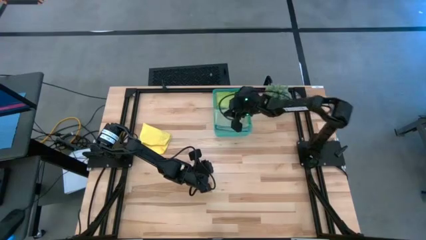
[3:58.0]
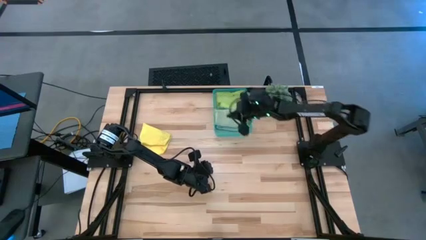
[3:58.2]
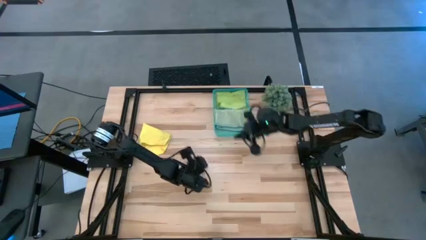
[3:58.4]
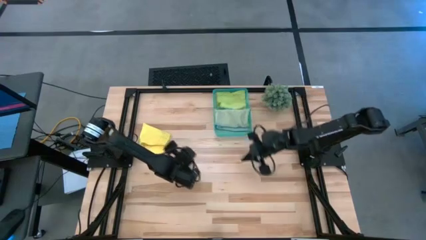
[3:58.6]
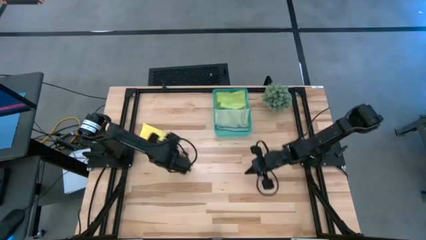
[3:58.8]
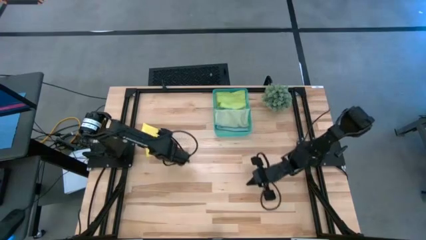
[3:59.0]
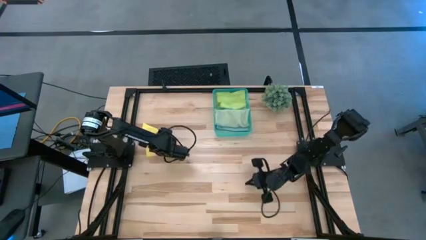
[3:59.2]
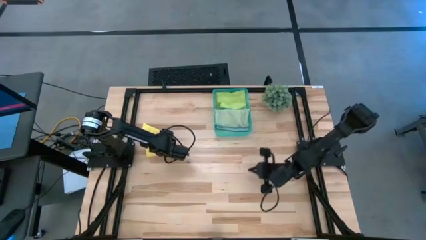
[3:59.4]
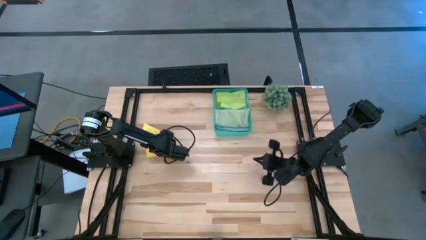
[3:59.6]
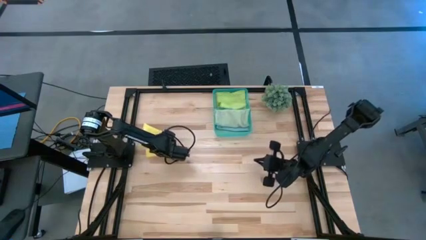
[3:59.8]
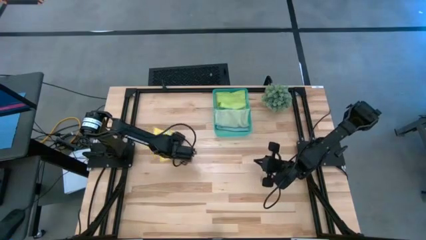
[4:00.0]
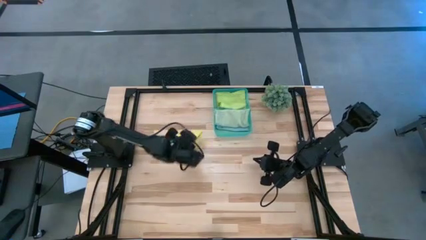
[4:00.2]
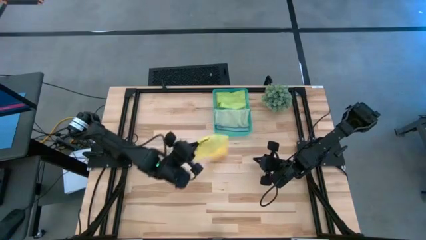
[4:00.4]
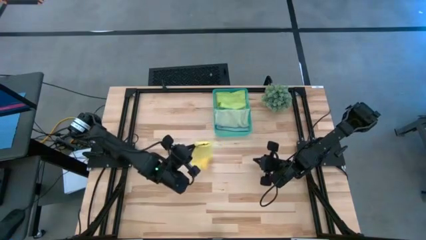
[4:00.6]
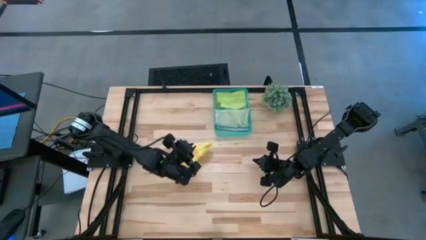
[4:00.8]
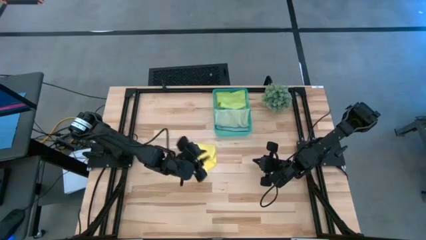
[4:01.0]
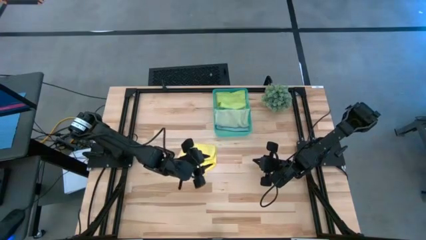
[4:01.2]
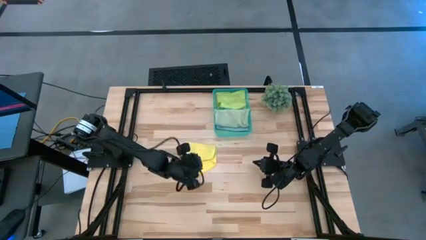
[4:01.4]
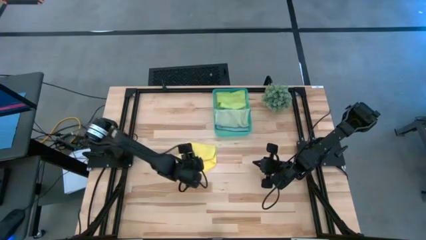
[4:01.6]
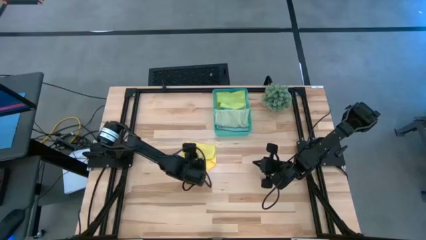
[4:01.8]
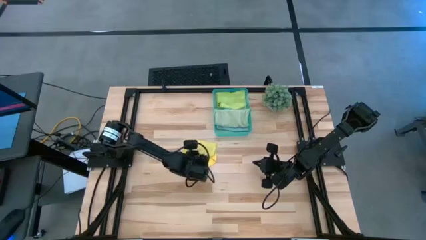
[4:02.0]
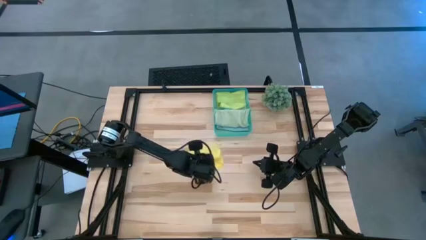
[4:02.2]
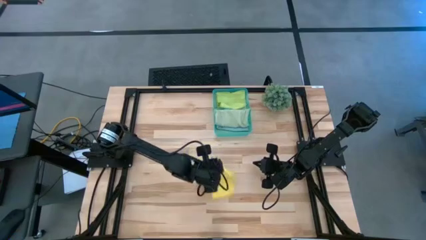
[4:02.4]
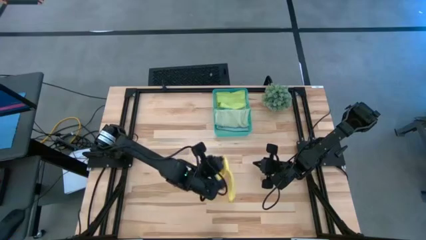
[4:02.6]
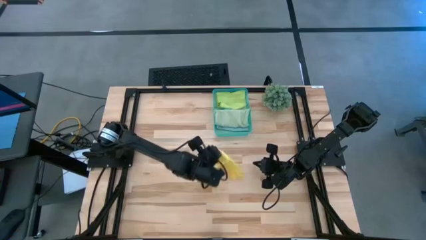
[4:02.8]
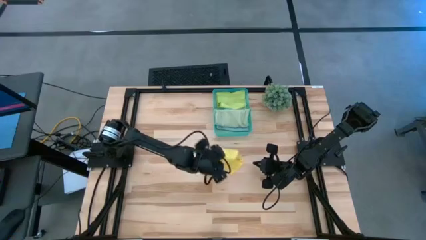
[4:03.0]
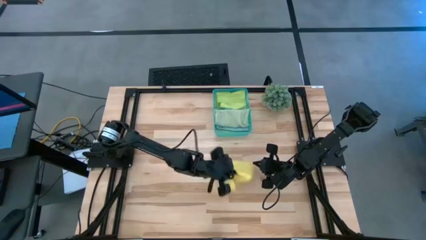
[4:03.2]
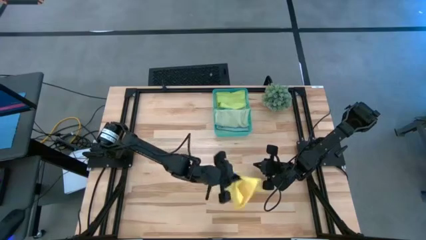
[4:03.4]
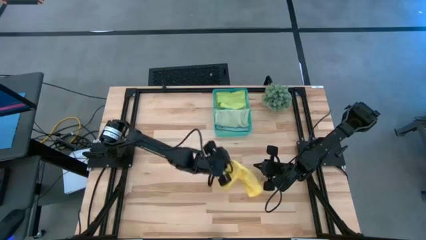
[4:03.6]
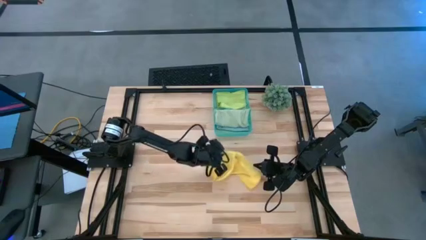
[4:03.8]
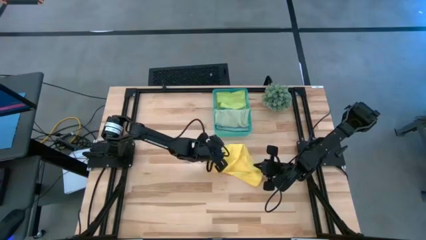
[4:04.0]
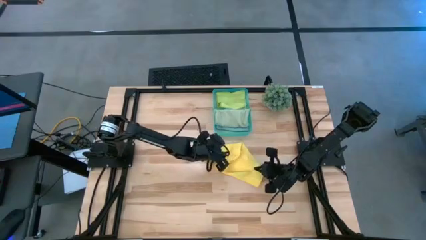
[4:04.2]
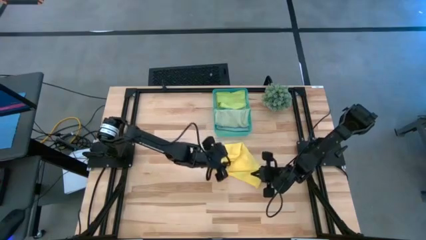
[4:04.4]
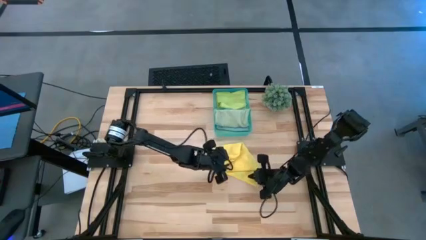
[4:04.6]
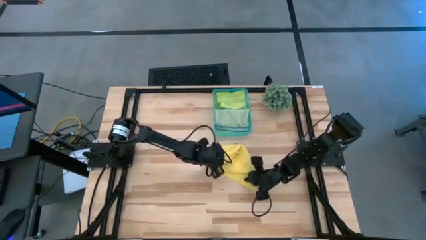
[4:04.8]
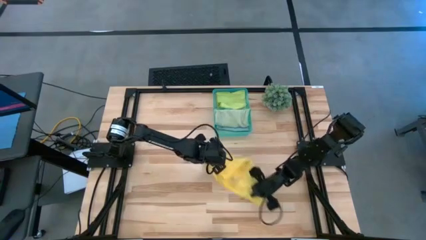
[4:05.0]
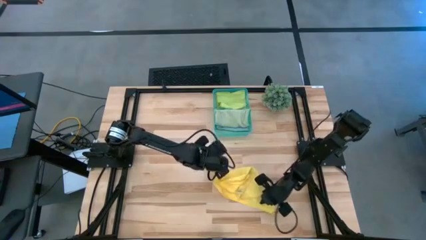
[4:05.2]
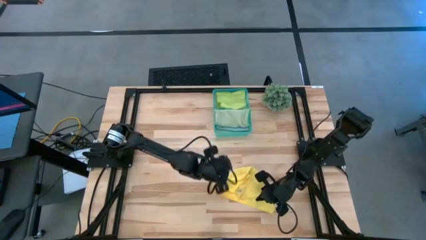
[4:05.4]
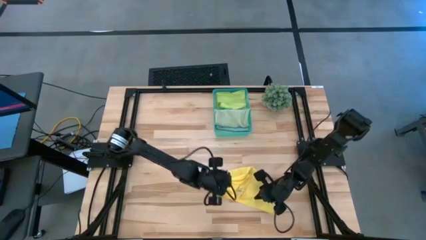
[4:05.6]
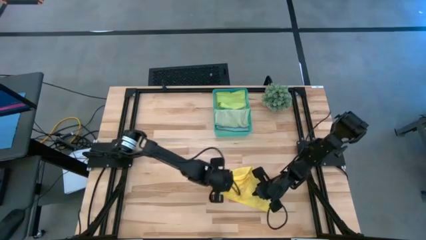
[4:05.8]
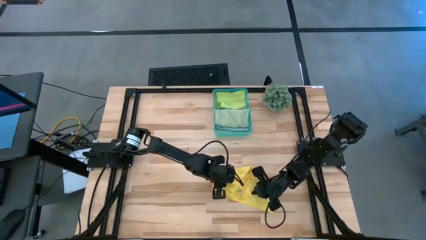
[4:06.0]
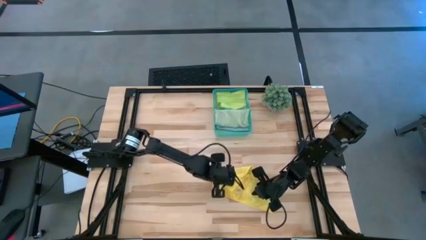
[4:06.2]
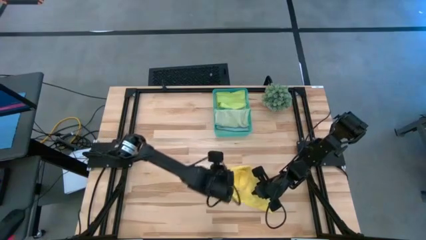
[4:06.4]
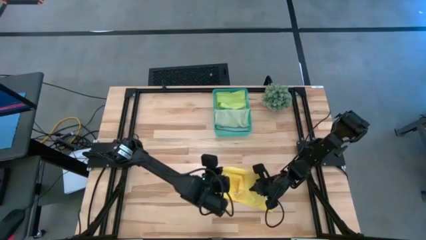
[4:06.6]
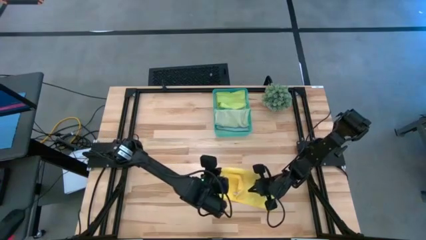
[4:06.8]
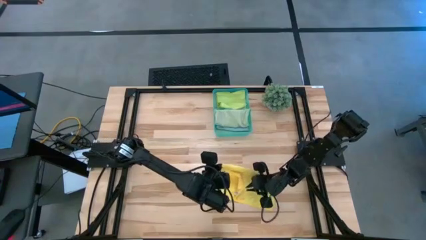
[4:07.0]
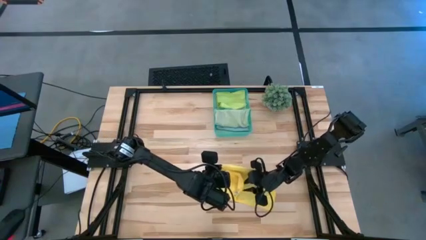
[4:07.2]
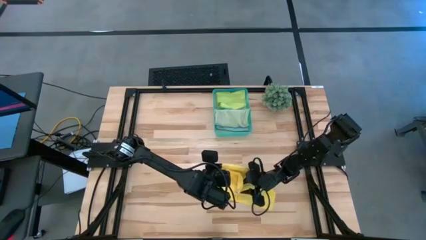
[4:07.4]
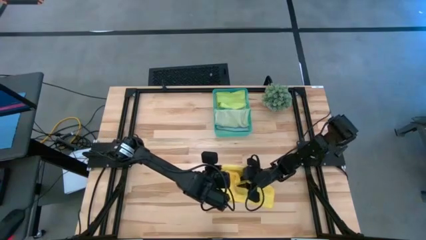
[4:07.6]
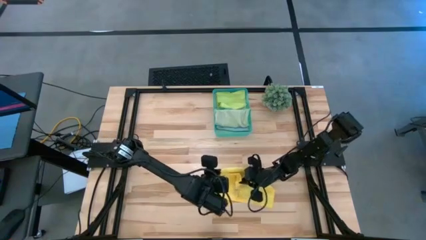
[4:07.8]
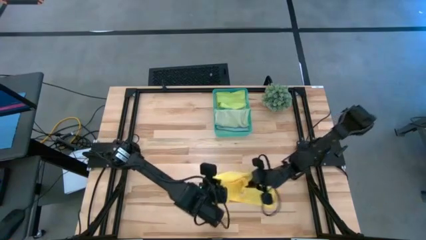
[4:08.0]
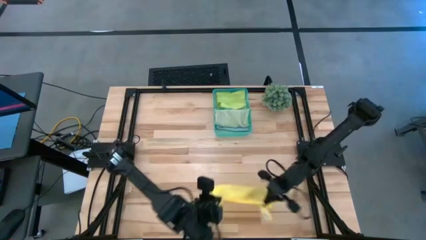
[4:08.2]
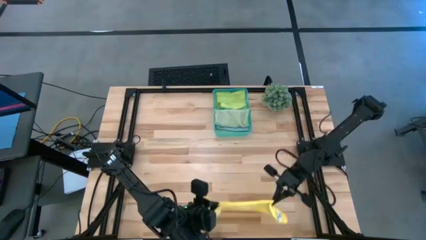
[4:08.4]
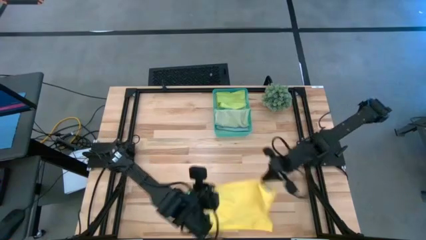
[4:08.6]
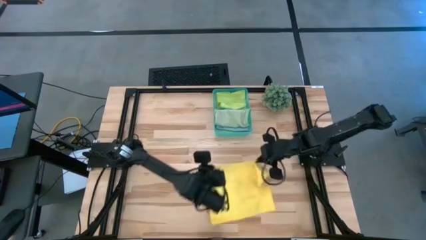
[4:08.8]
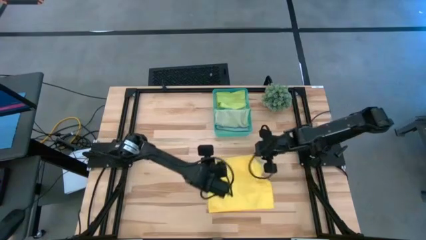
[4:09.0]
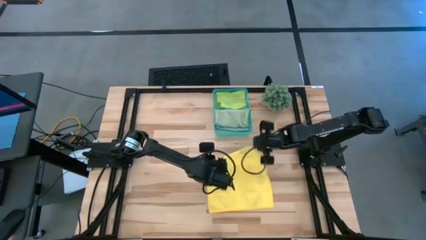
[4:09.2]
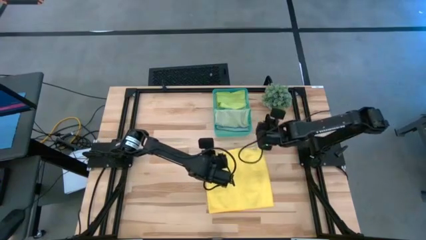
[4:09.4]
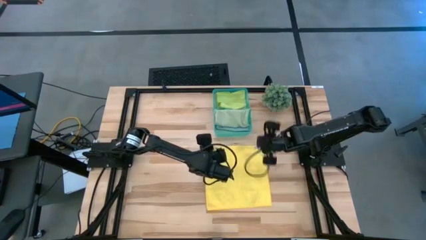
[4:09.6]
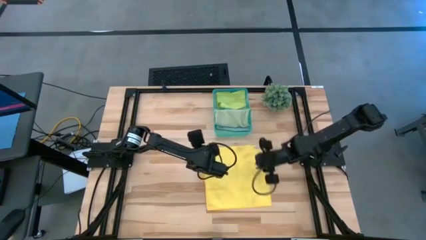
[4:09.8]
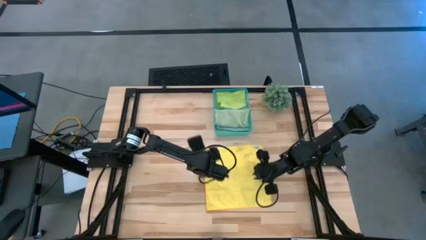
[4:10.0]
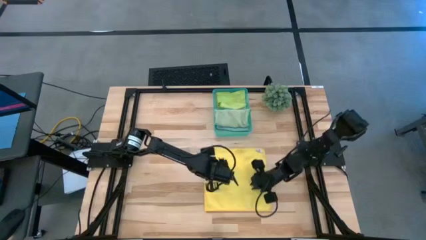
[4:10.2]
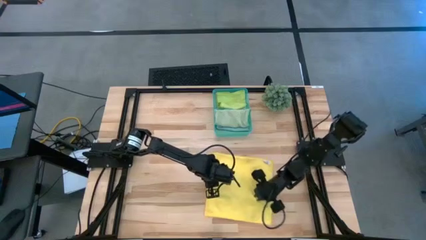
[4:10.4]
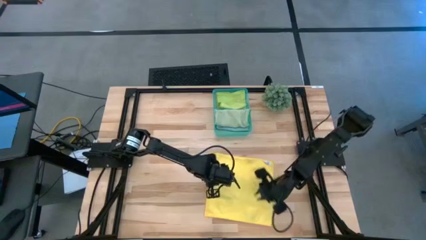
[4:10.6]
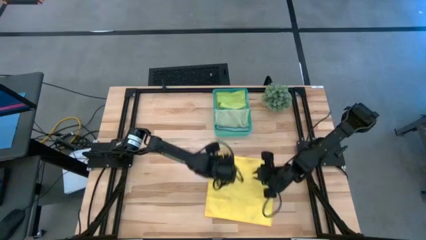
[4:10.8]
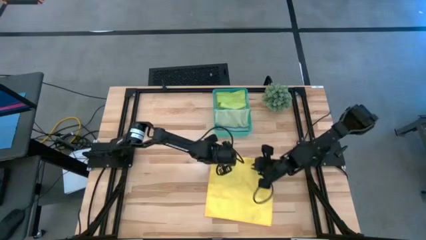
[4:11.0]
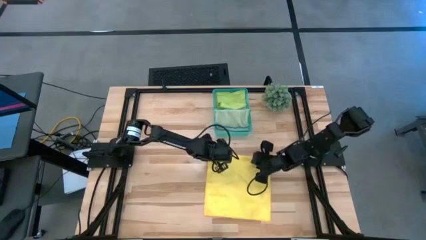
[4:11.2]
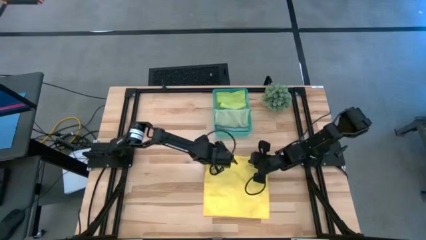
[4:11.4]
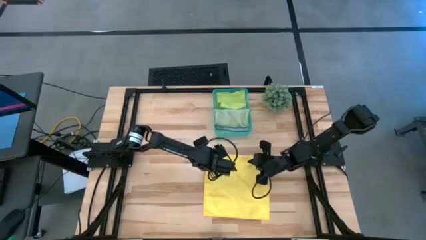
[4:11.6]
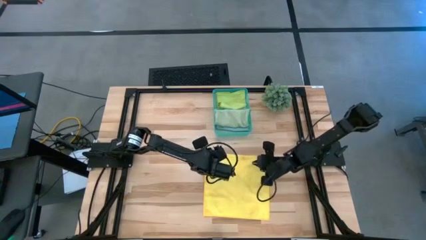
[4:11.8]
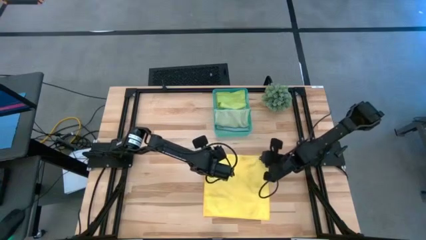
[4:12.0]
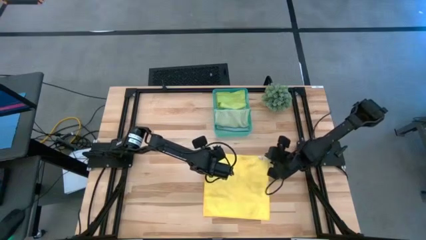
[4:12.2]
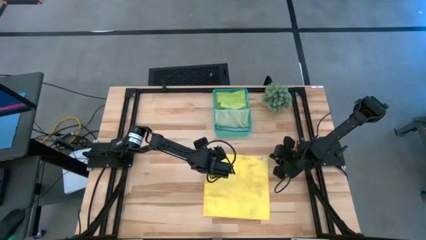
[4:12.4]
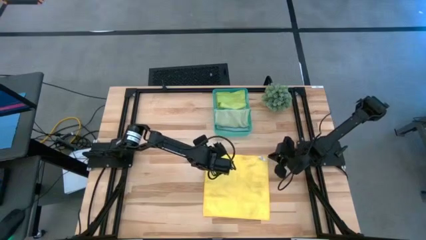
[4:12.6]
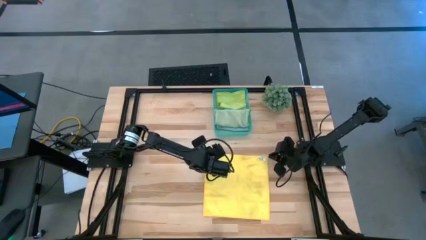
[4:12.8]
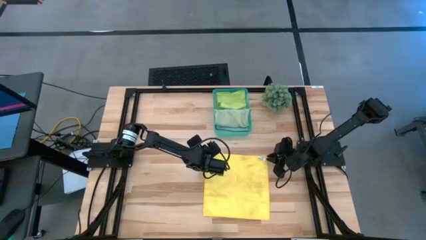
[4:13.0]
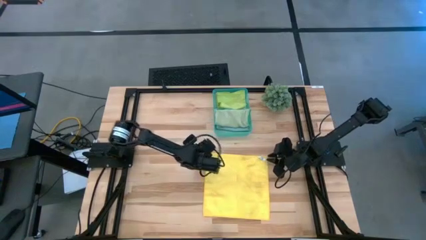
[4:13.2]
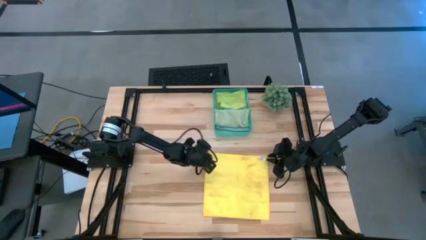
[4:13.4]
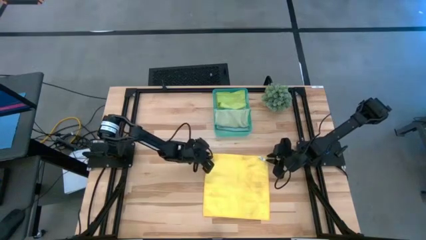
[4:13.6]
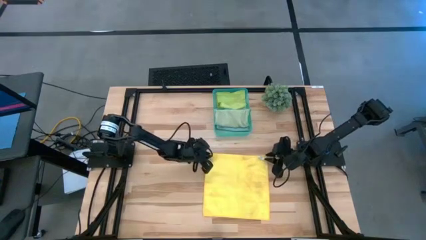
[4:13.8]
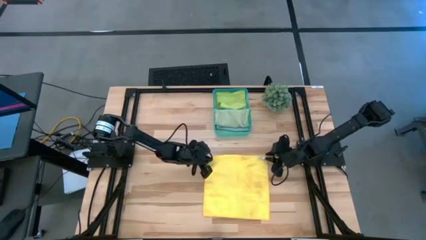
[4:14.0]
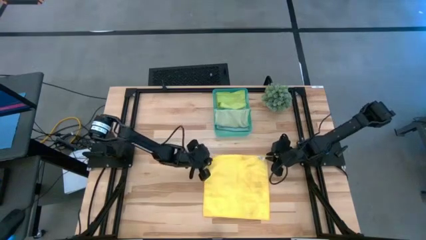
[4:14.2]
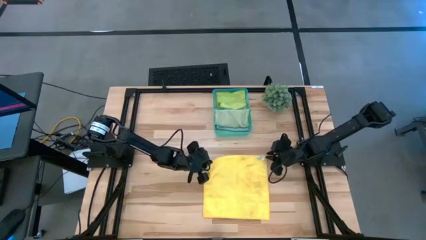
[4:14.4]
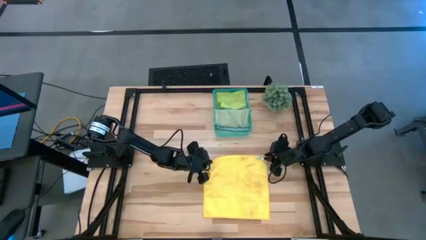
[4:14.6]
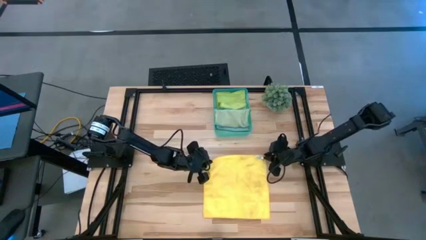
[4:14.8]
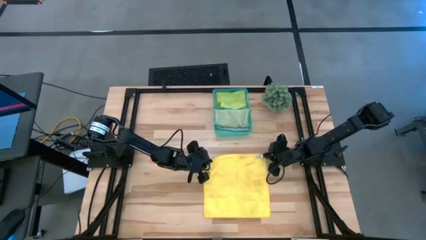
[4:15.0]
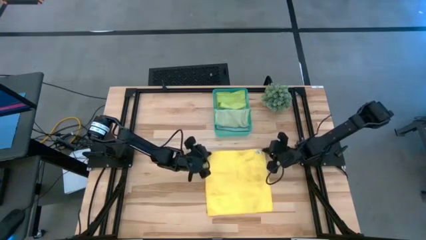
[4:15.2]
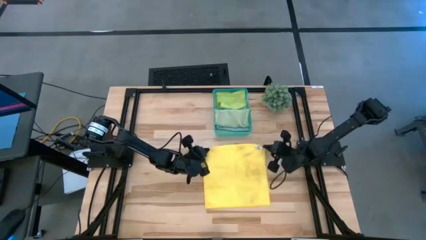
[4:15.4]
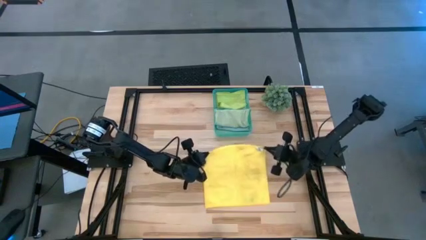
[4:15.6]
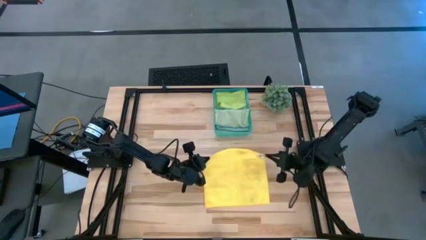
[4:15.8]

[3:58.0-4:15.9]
Task: Fold microfiber towels
Fold the yellow microfiber cloth
